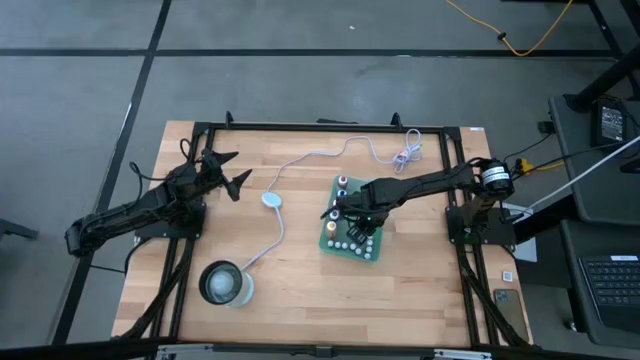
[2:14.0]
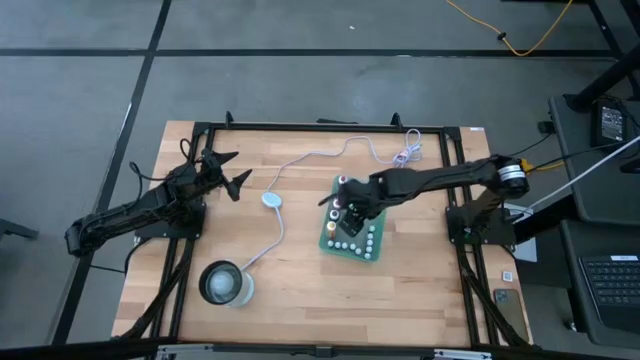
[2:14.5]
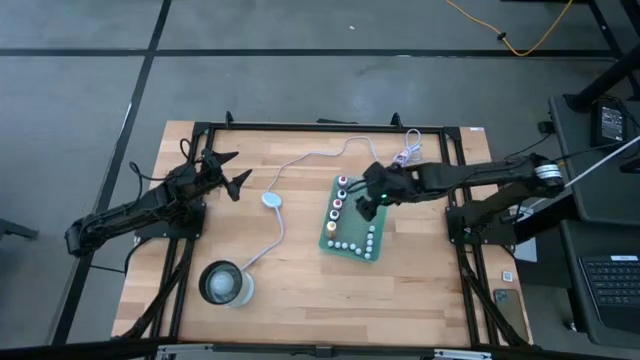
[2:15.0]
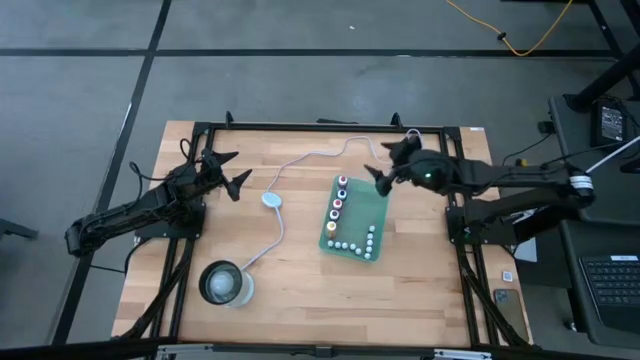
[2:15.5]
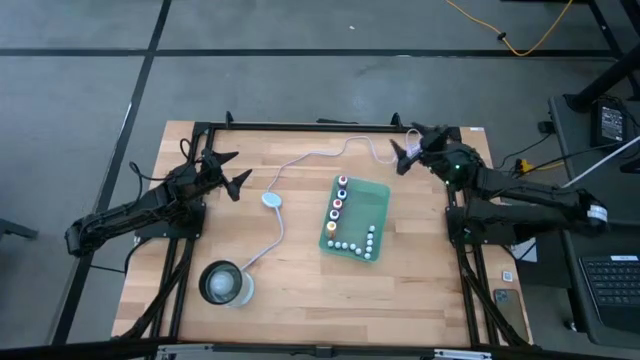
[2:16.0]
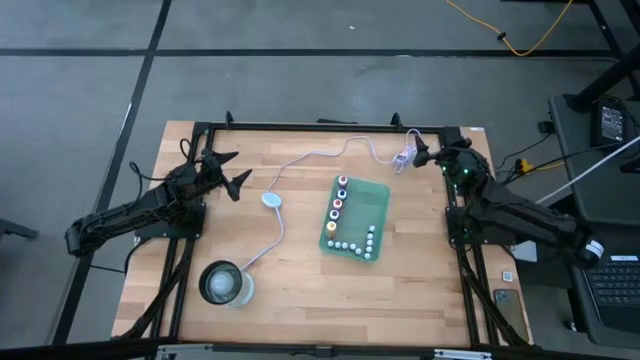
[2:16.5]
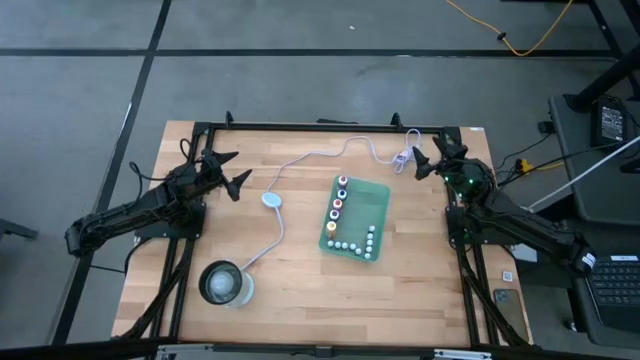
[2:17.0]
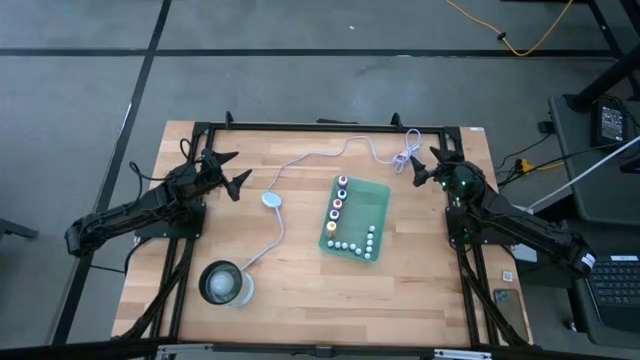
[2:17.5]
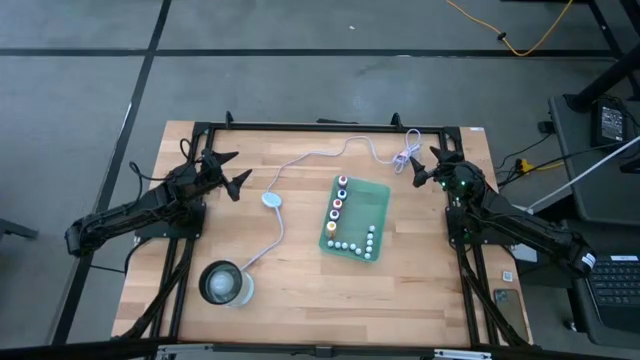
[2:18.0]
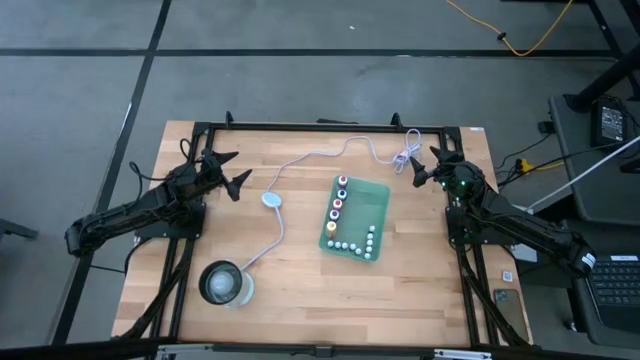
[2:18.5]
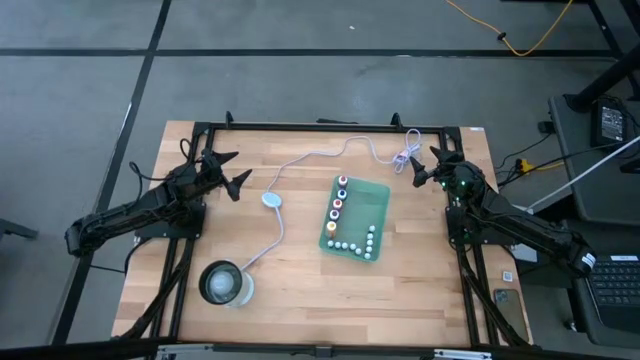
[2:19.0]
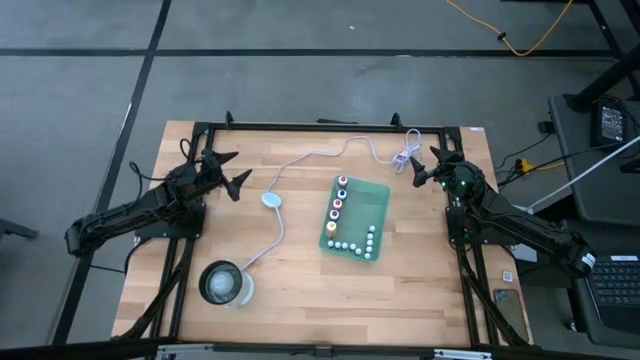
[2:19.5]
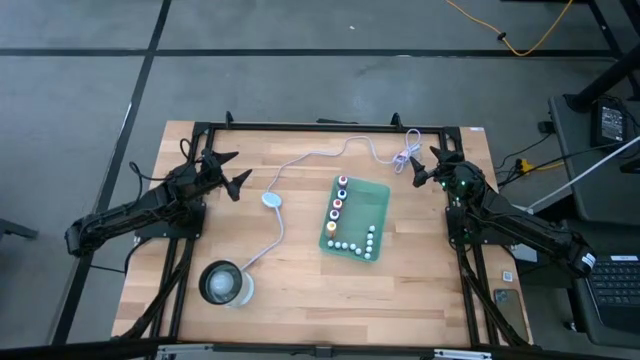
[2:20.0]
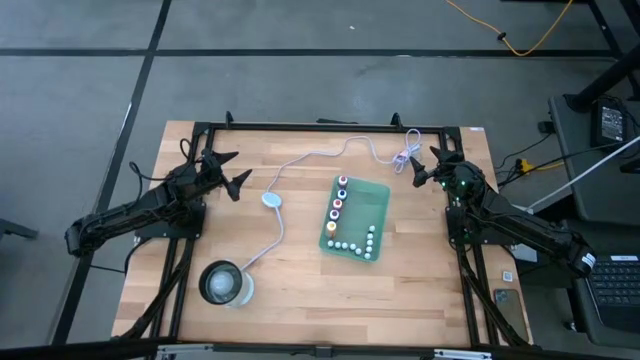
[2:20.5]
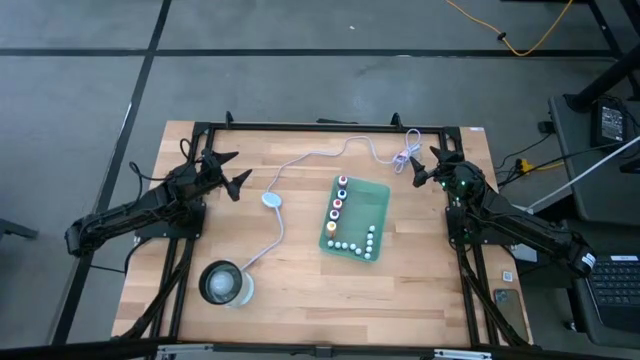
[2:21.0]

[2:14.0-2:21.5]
Task: Pick & Place food coloring
Return to Home Position

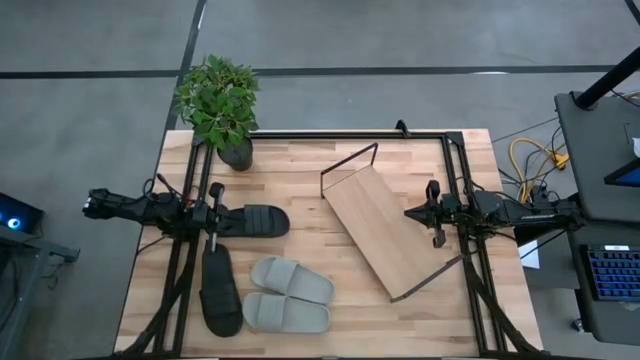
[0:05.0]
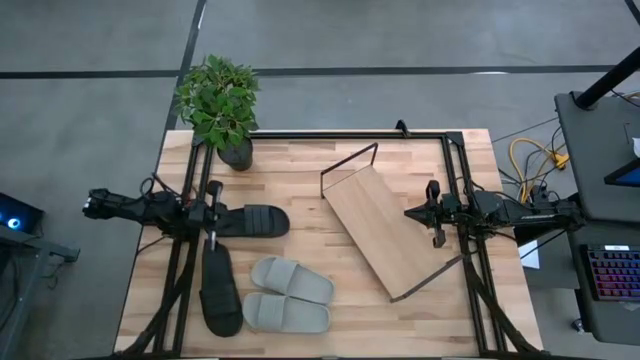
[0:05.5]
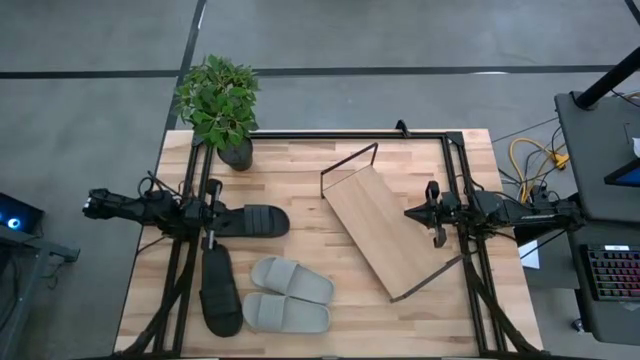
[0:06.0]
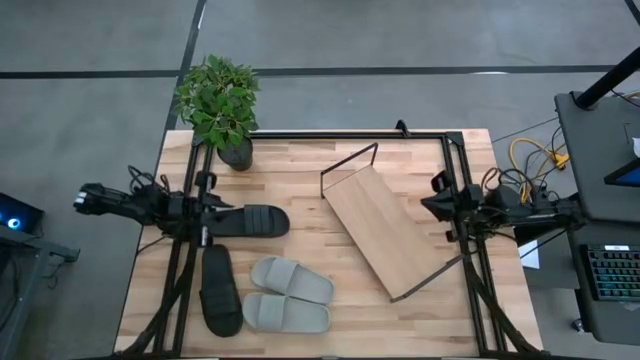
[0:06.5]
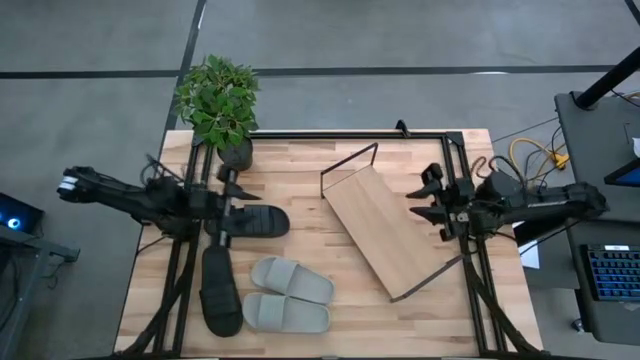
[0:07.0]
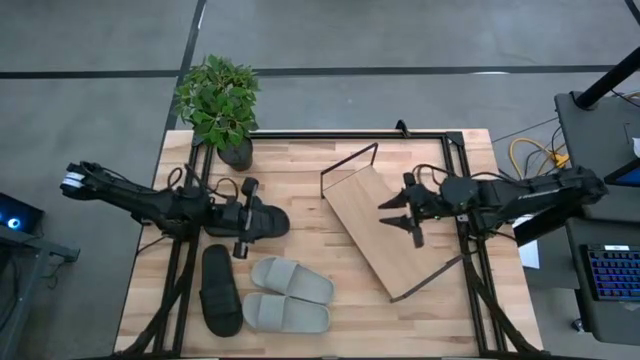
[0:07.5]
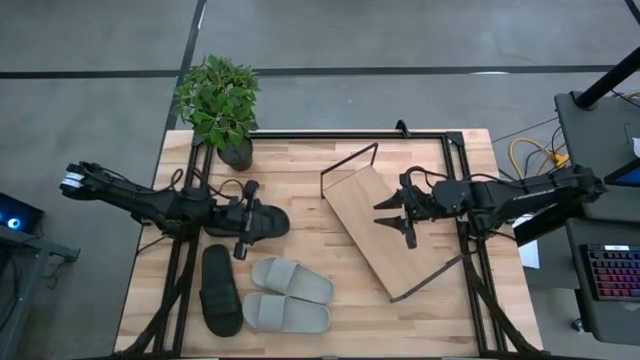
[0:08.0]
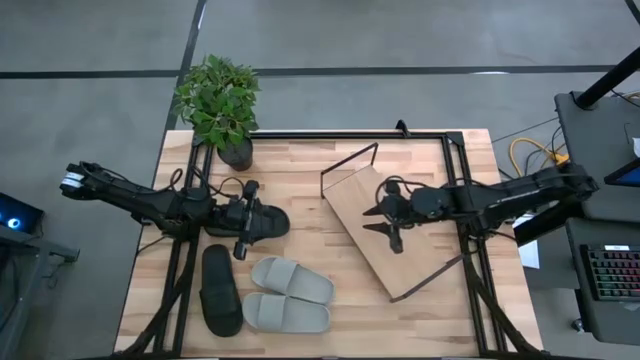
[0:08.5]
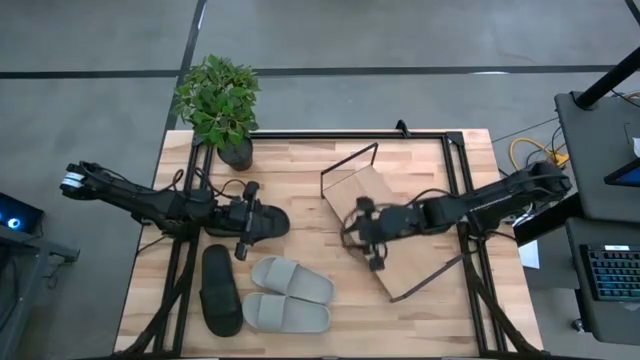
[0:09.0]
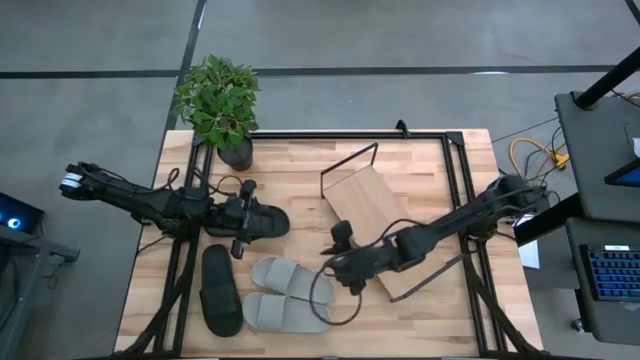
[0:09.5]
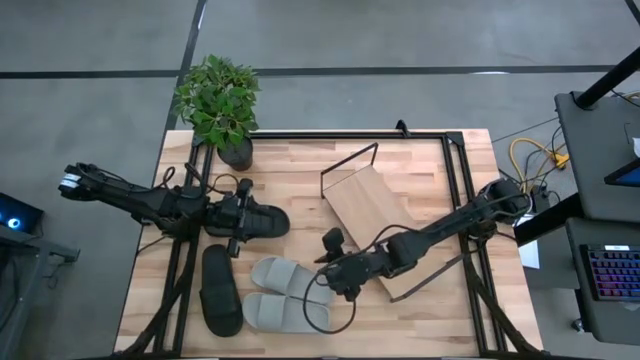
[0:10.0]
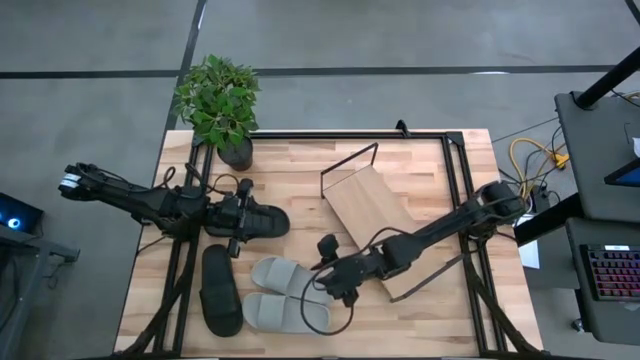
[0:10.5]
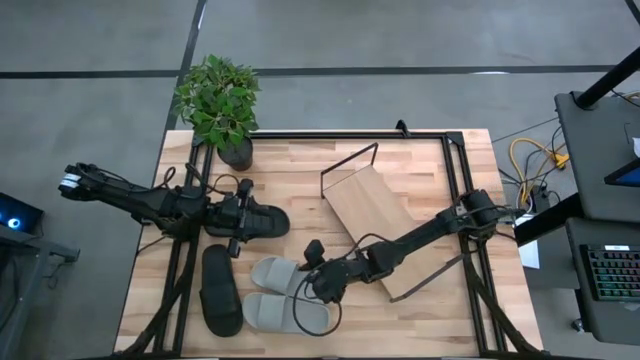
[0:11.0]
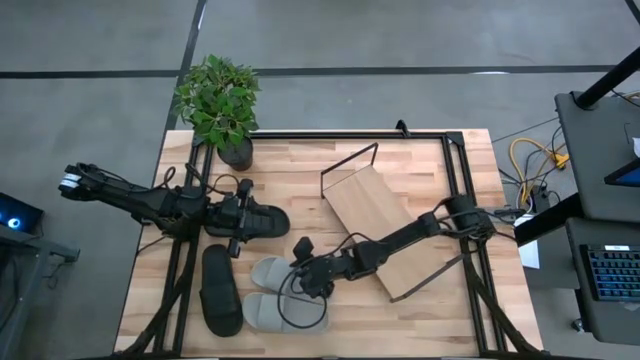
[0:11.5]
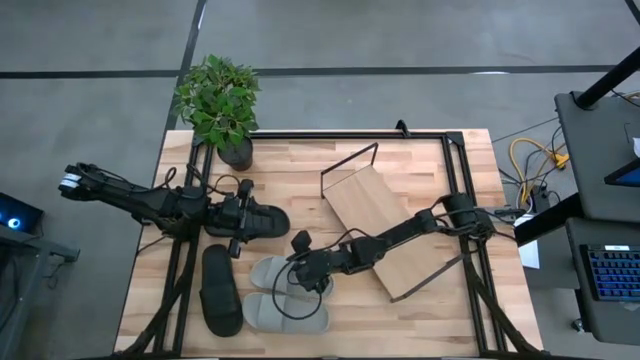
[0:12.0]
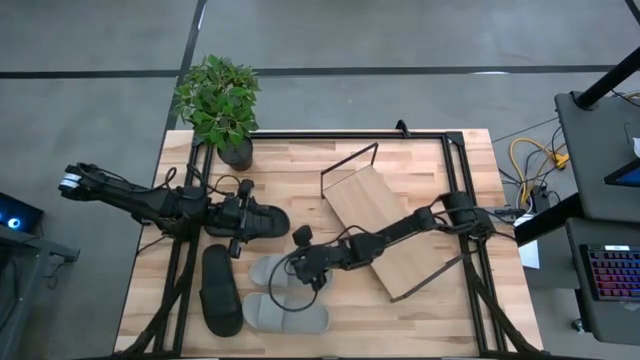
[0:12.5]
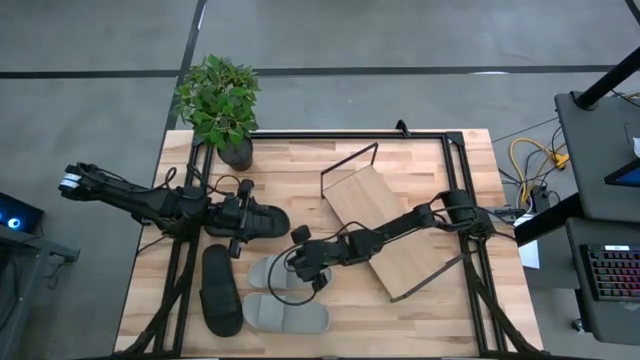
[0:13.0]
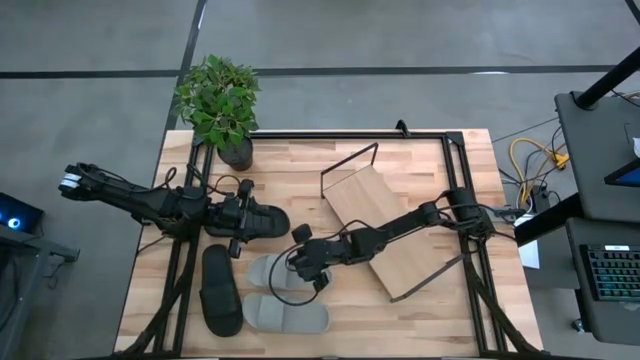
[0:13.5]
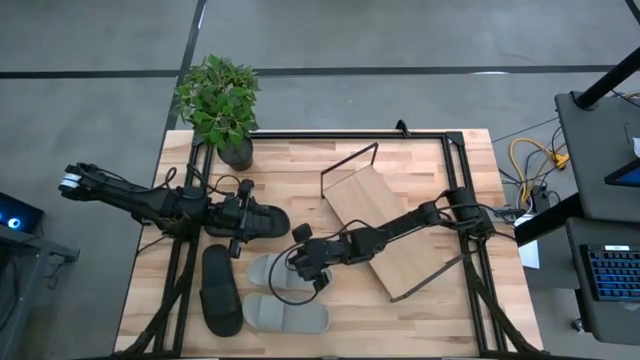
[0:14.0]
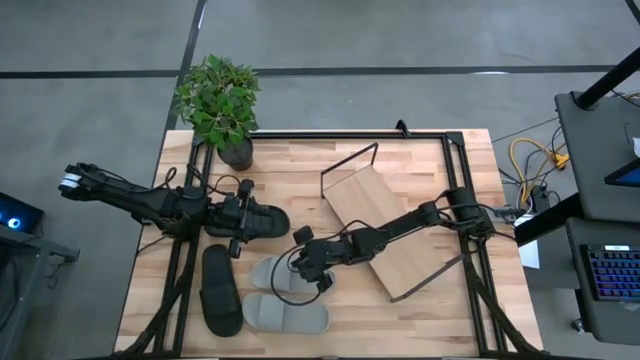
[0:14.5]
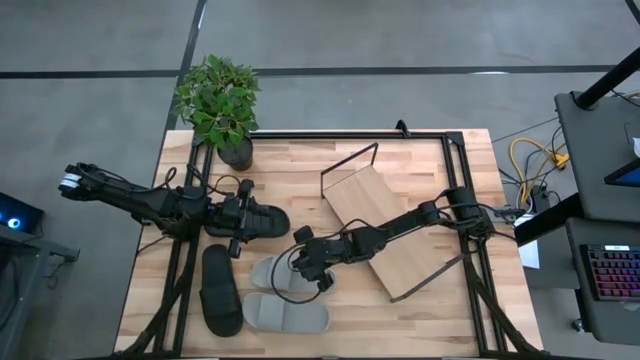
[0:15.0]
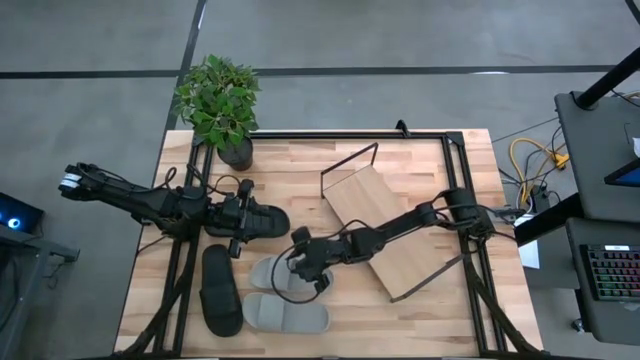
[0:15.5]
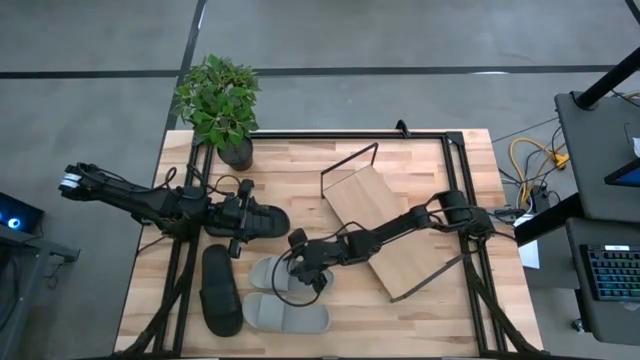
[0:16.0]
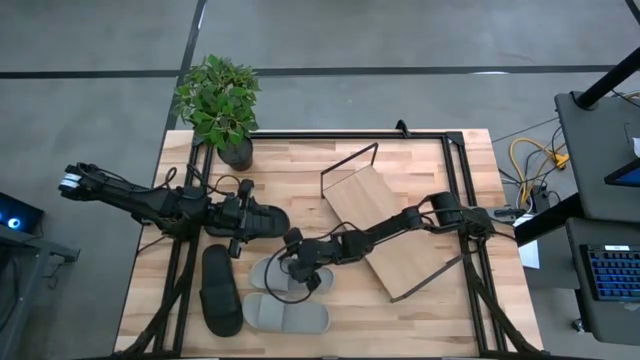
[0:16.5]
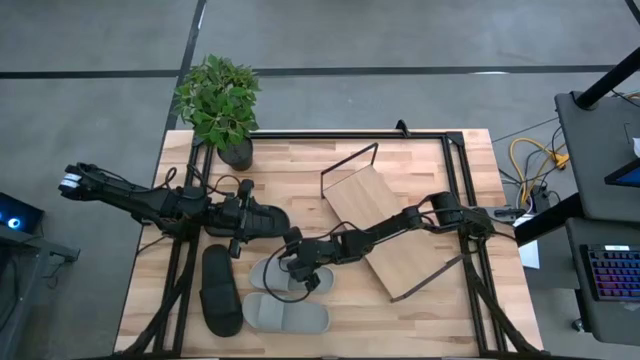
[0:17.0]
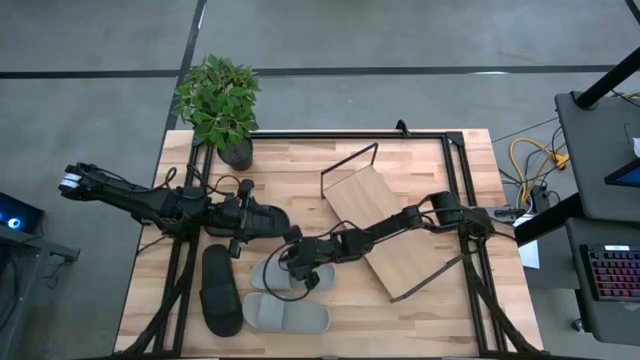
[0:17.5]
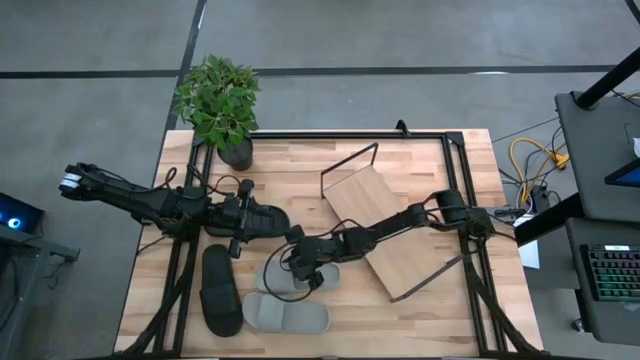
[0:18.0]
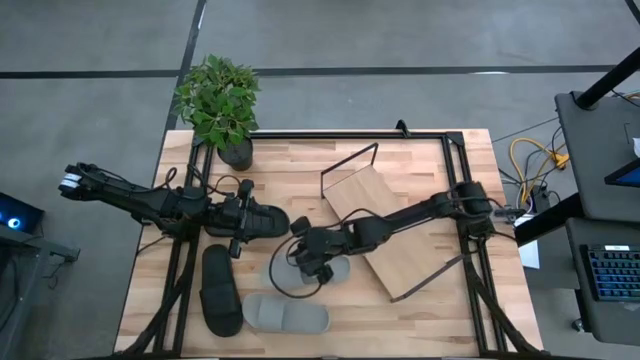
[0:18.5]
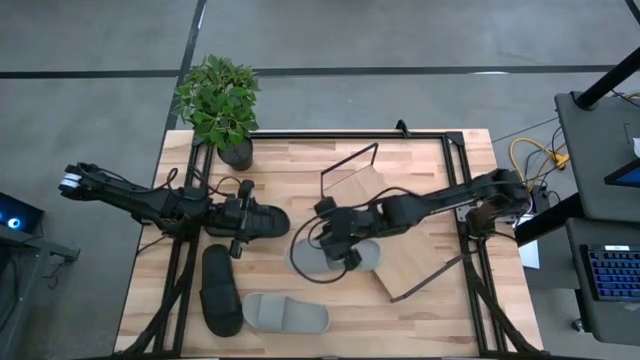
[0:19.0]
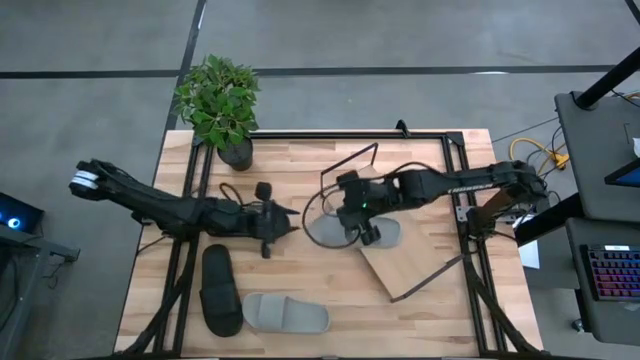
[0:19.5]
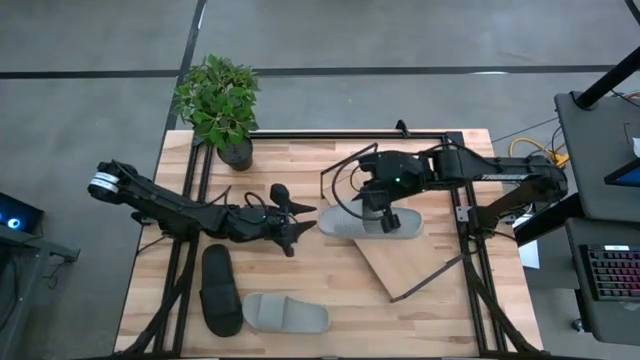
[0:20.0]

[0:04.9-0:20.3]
Task: Pick and place slides into the shelf
Put the top gray slide on the shelf
